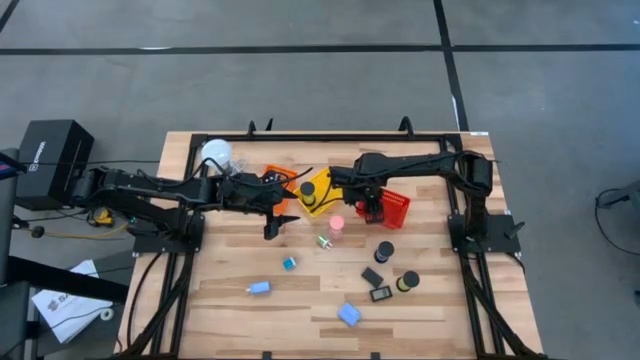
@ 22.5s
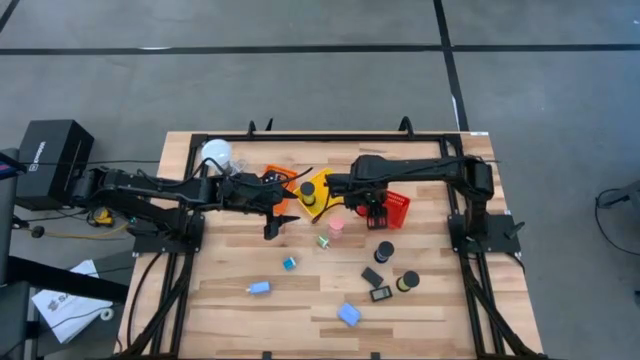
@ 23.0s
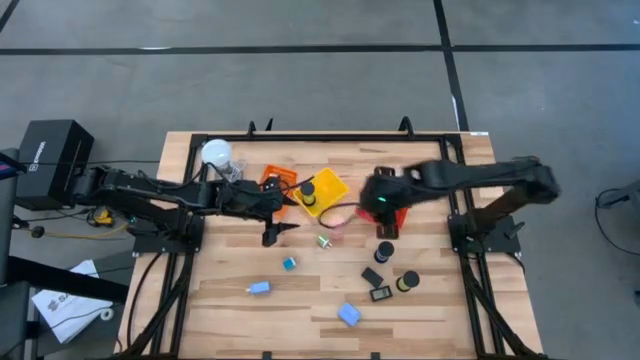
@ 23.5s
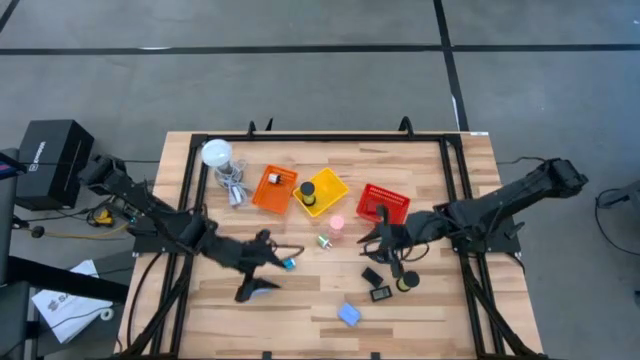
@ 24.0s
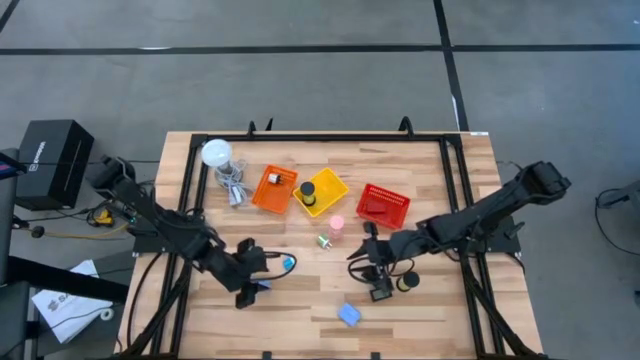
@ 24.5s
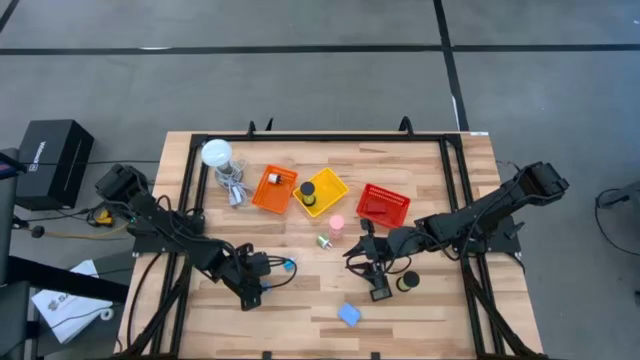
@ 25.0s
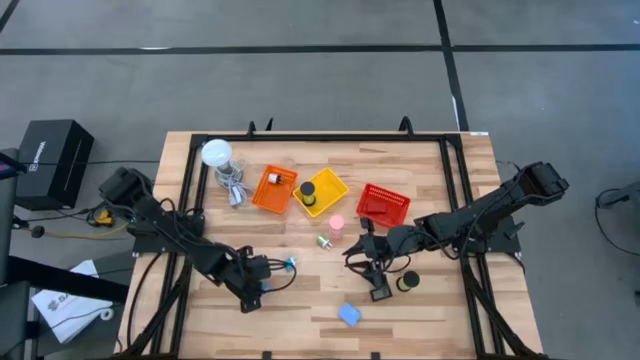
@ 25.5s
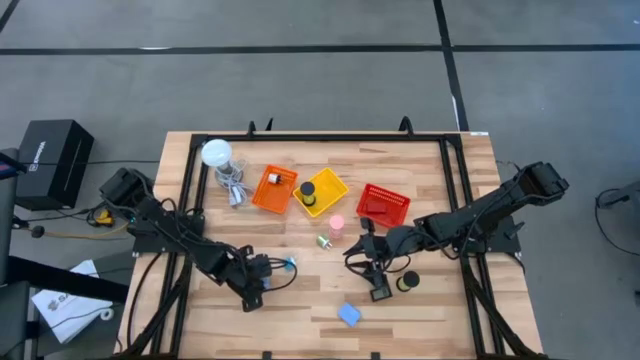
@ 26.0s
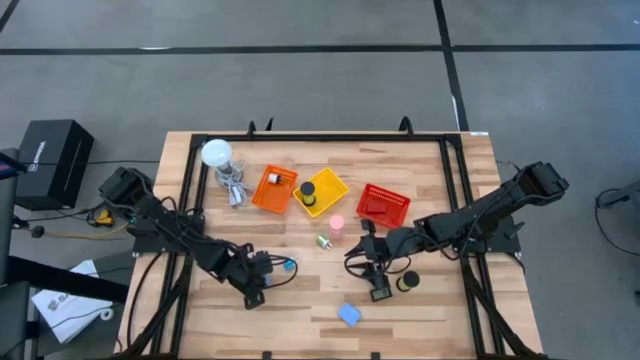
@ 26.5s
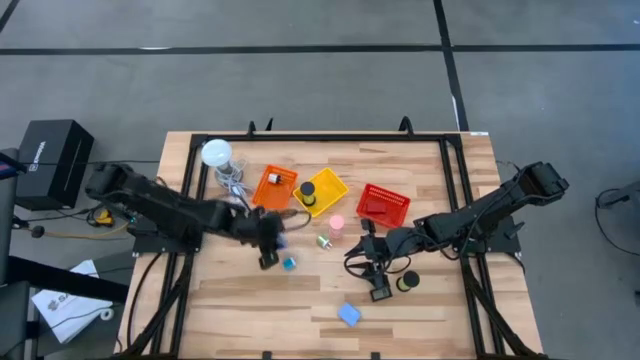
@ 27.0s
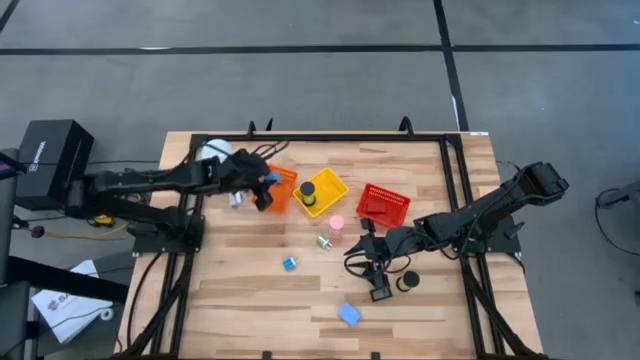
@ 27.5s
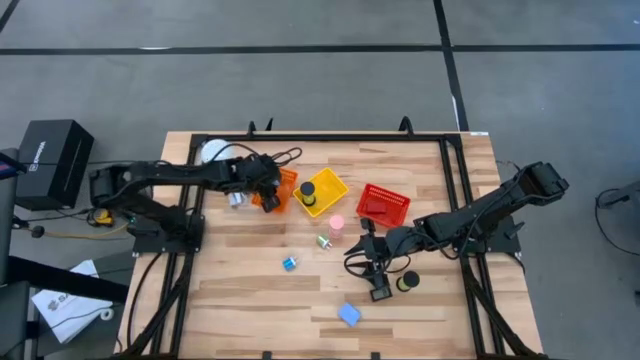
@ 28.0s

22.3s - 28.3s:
Task: Pick & Place Office items
Put the left blue charger adapter in the orange bin

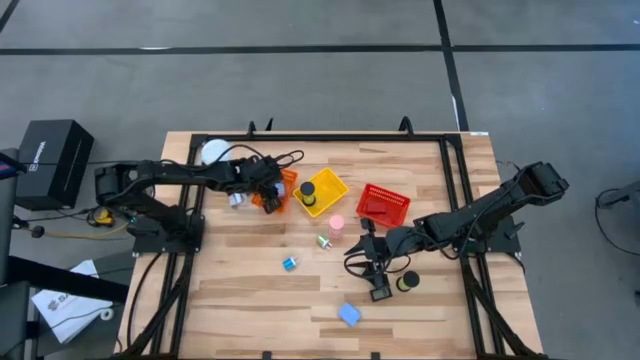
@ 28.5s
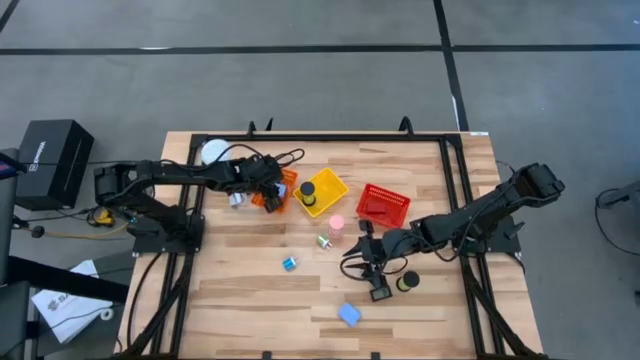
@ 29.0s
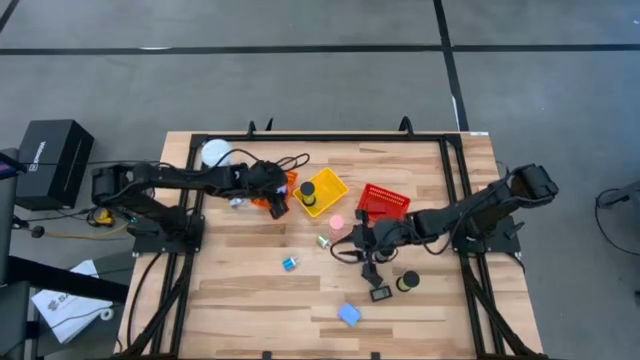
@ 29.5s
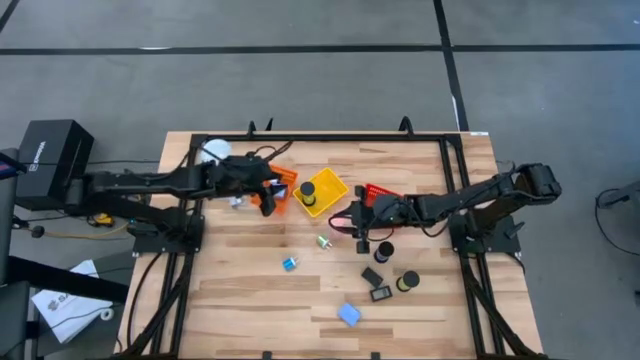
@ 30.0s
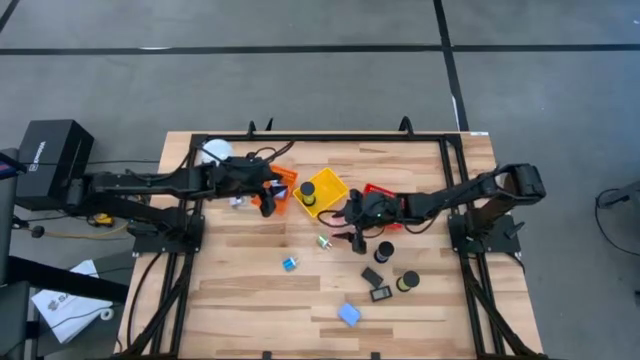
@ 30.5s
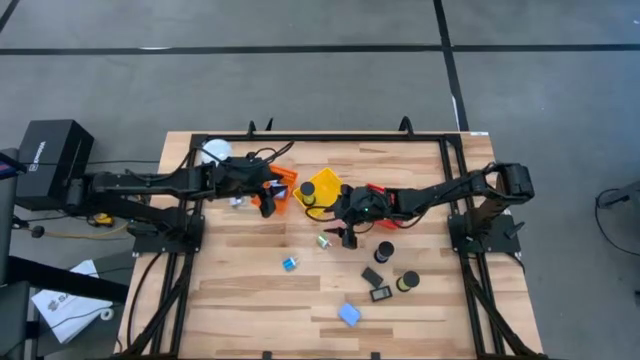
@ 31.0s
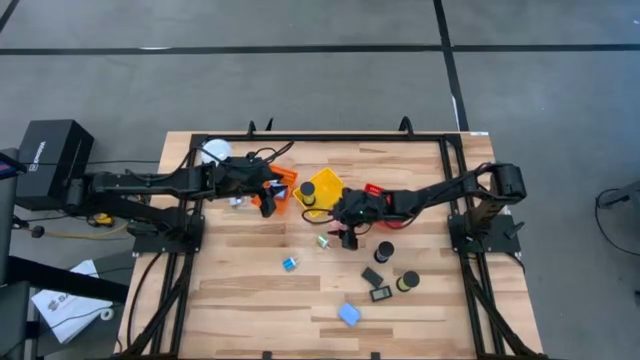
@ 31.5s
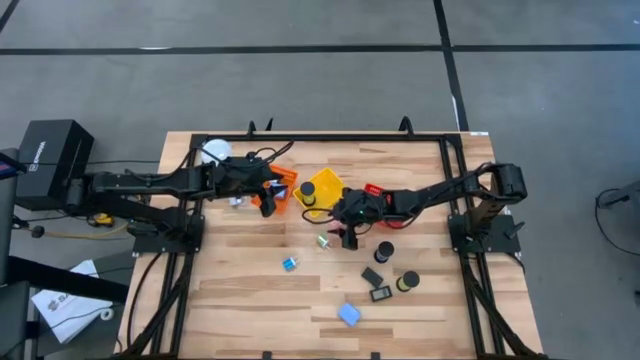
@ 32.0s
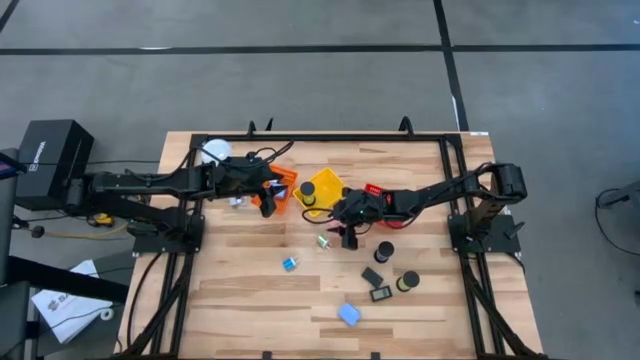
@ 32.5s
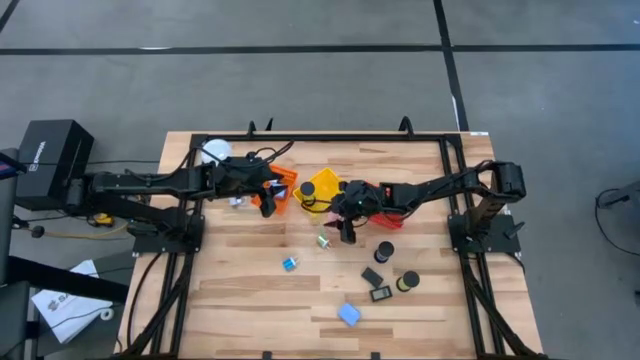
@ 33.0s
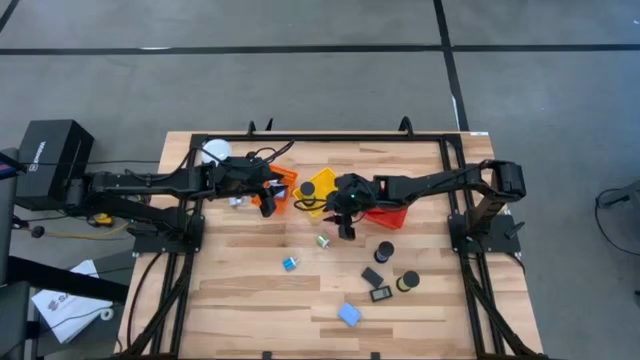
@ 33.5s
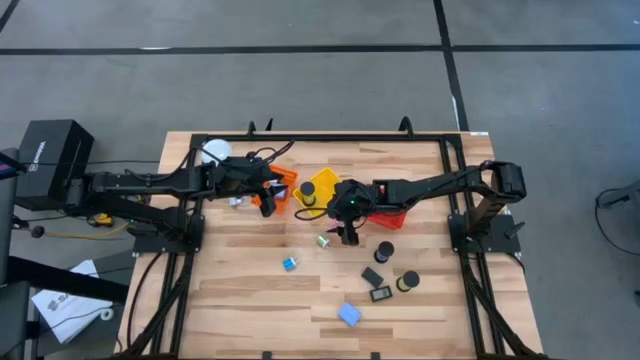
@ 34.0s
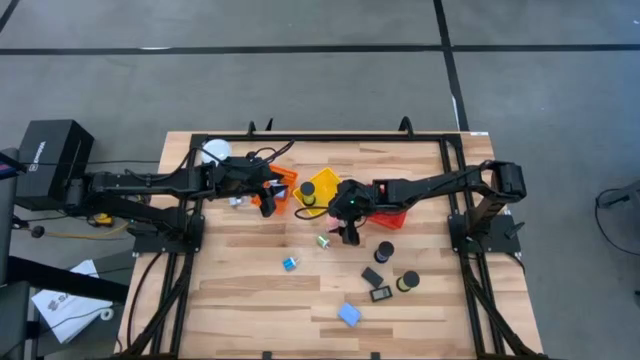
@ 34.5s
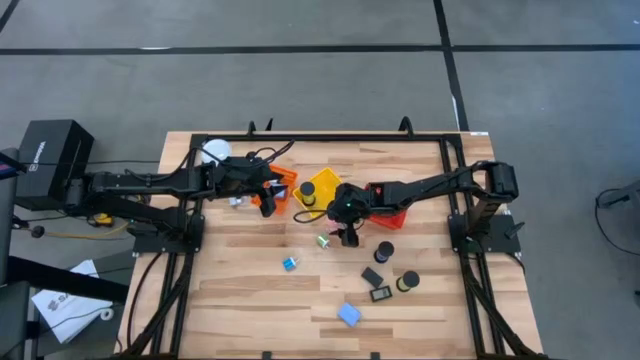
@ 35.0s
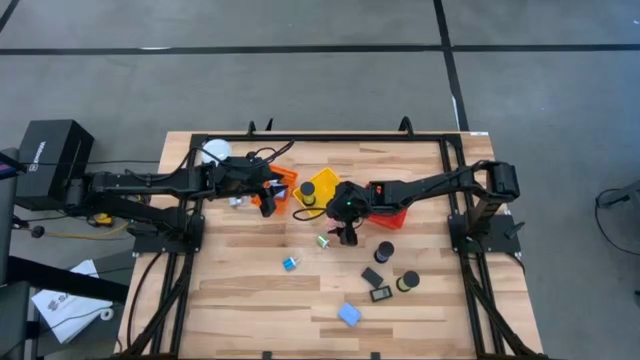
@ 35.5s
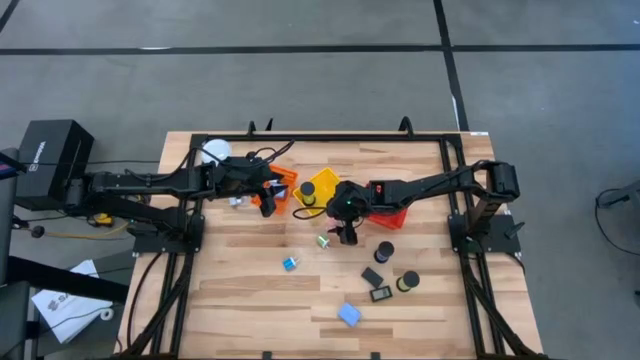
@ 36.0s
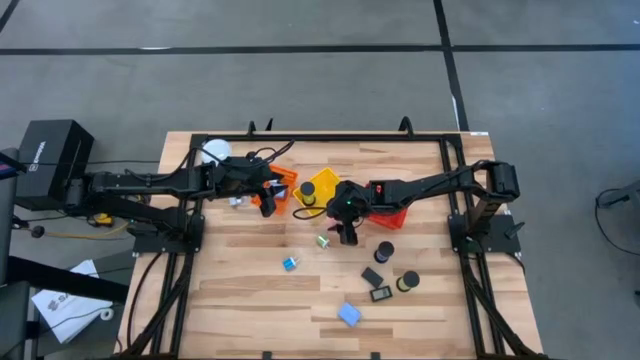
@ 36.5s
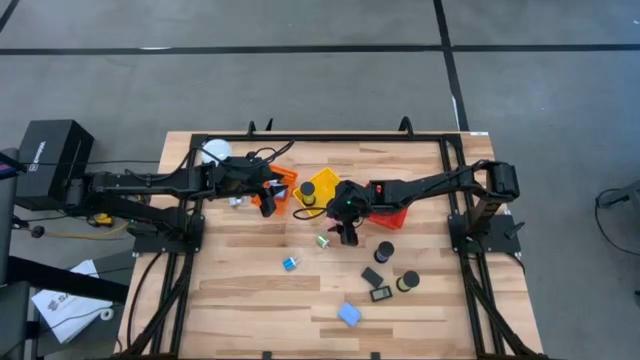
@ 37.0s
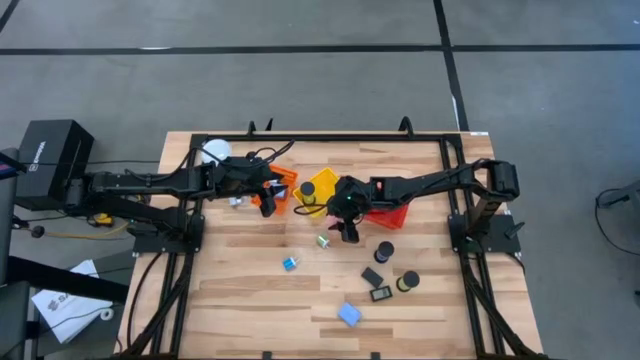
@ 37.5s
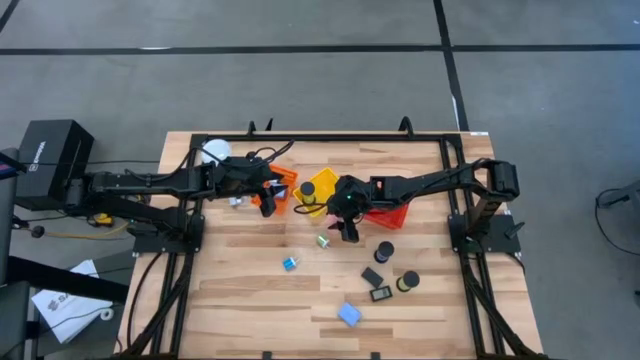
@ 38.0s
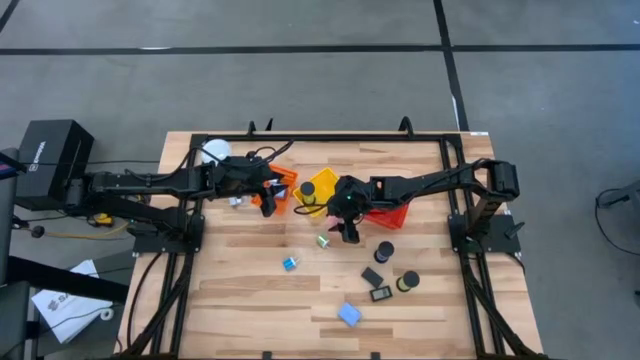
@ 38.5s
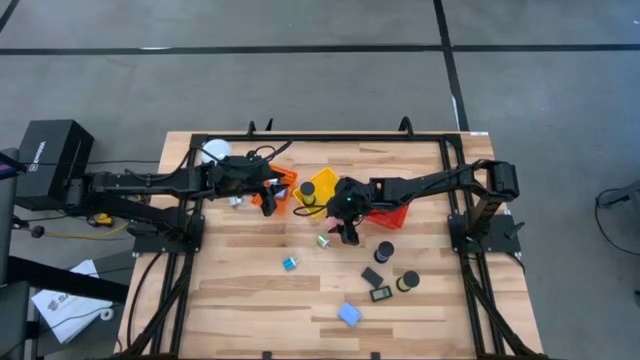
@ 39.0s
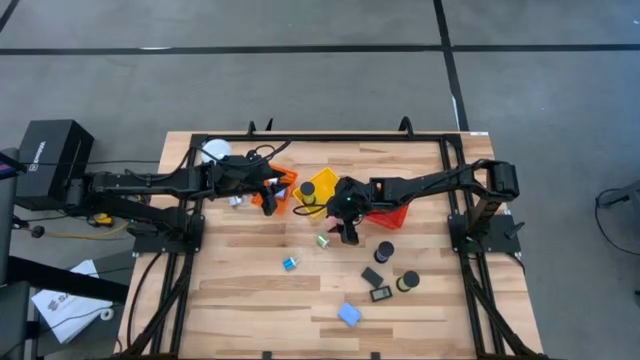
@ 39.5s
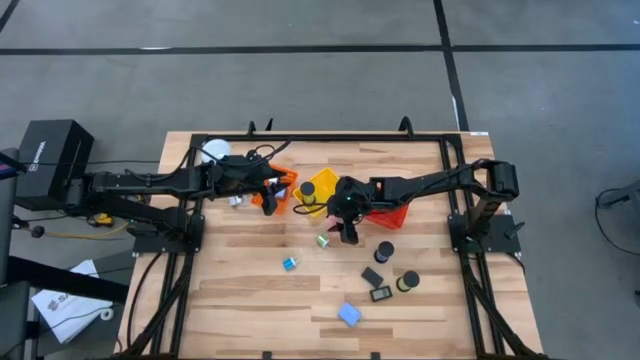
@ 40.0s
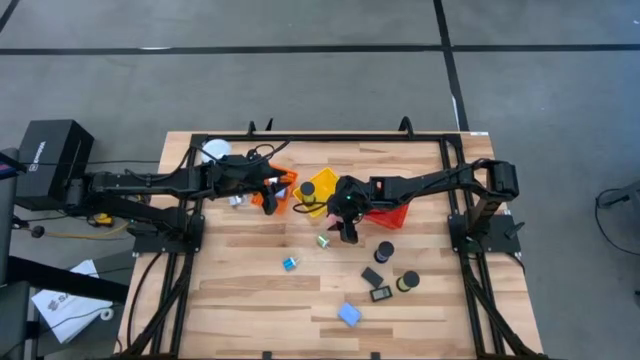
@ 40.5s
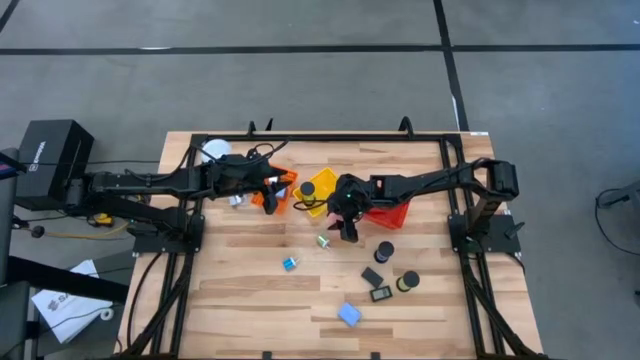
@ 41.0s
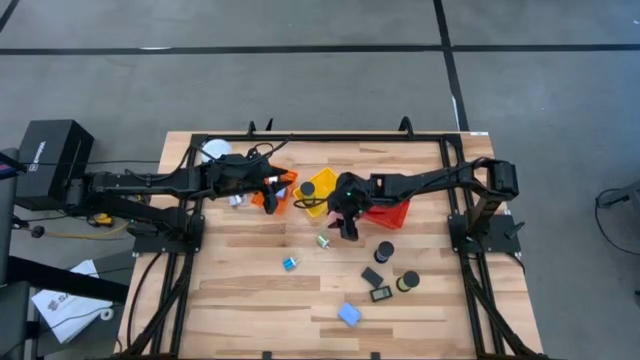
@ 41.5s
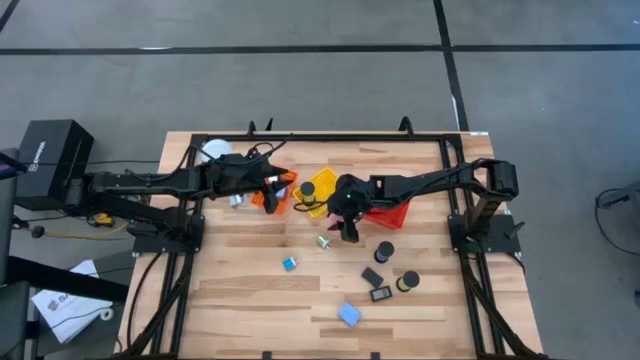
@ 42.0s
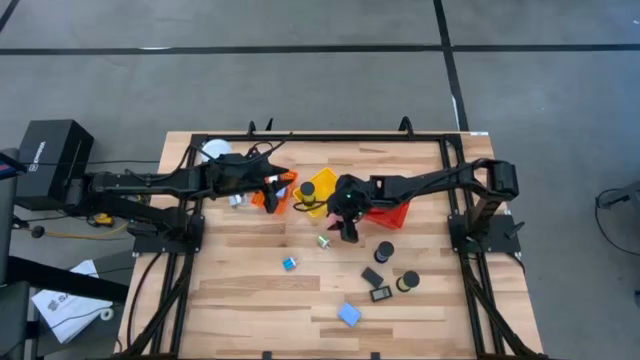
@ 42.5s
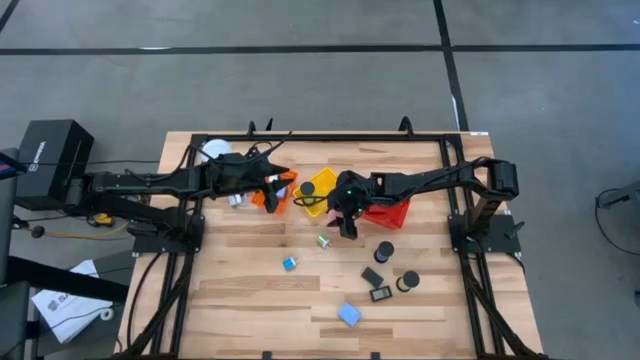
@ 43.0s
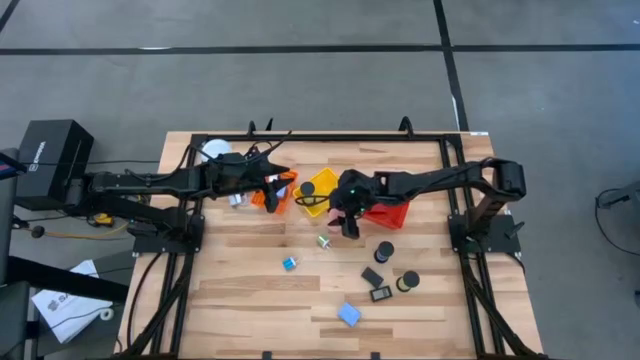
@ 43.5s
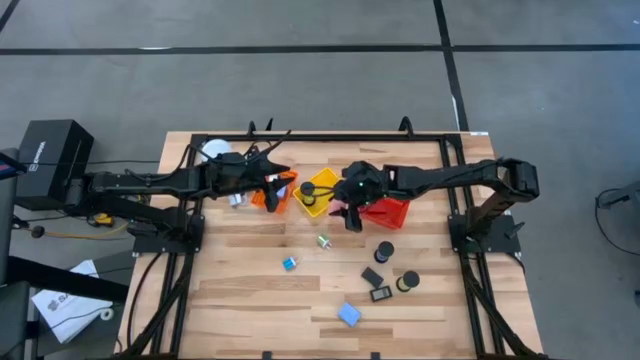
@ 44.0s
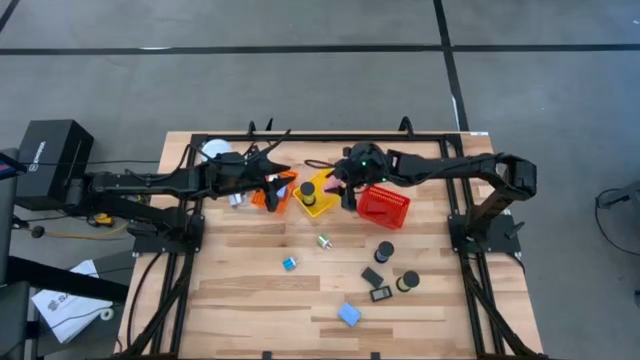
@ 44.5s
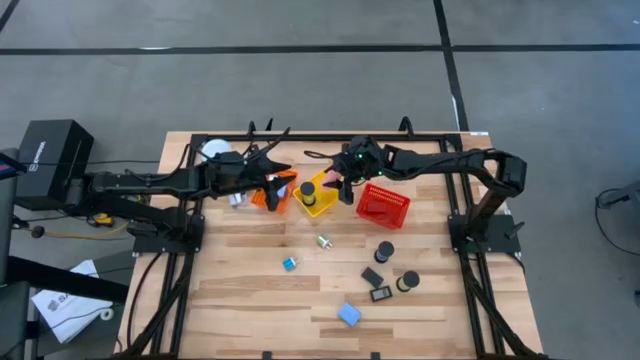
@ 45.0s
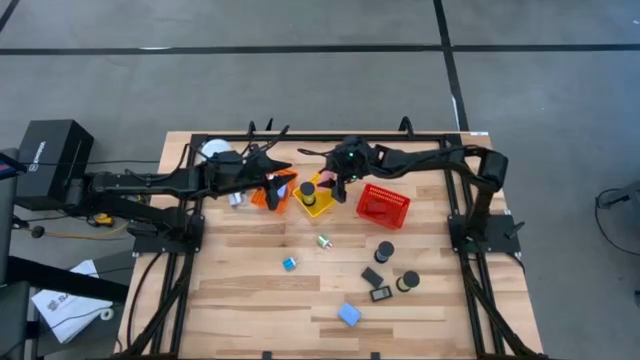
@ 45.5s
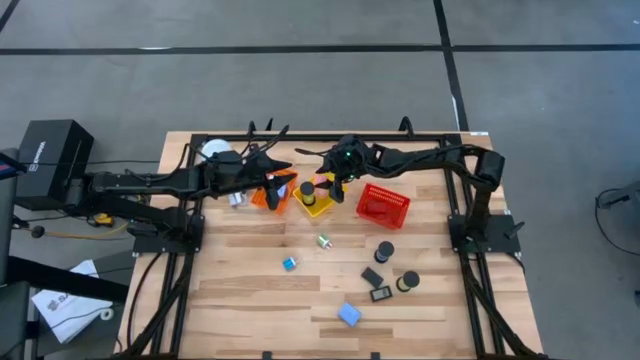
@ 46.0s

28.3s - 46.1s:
Put the pink hourglass into the yellow bin
